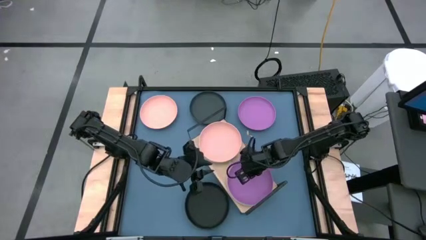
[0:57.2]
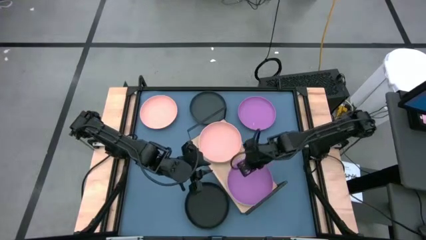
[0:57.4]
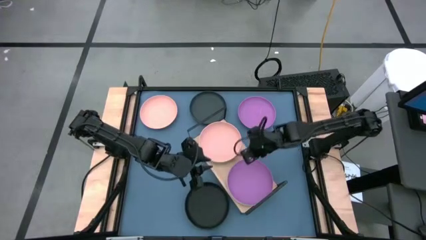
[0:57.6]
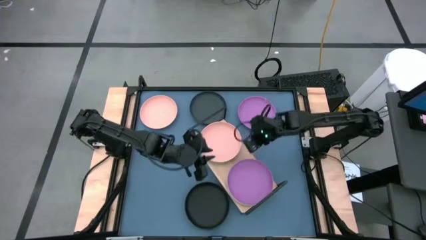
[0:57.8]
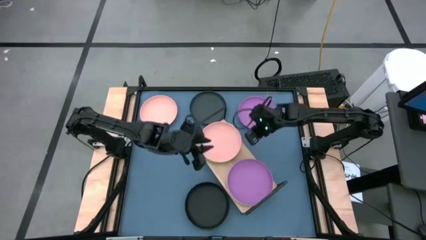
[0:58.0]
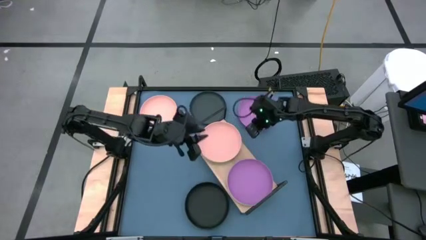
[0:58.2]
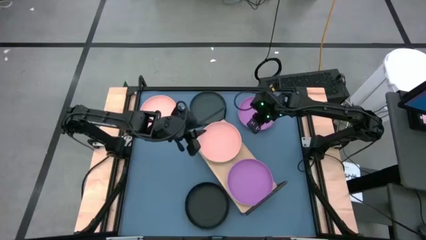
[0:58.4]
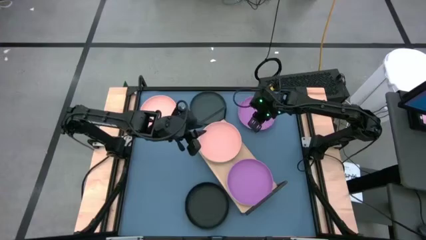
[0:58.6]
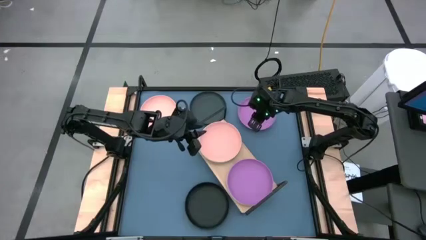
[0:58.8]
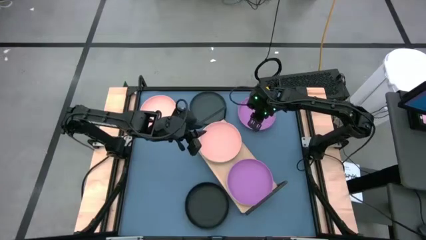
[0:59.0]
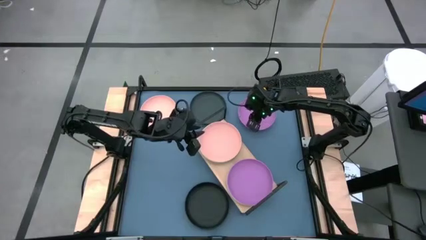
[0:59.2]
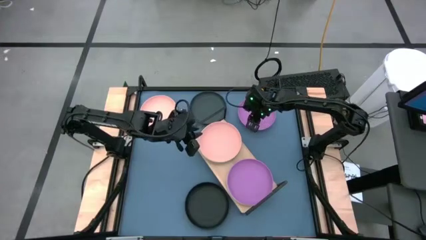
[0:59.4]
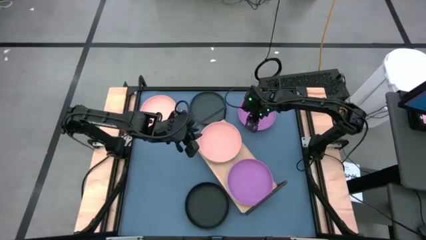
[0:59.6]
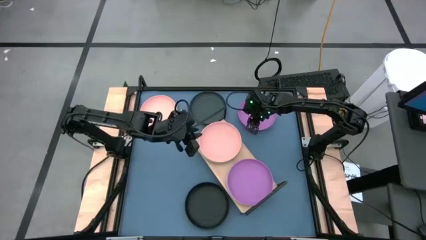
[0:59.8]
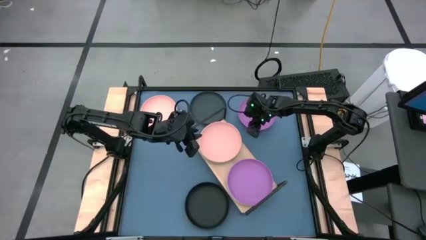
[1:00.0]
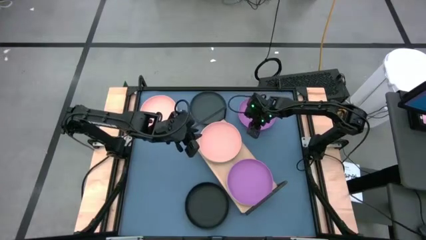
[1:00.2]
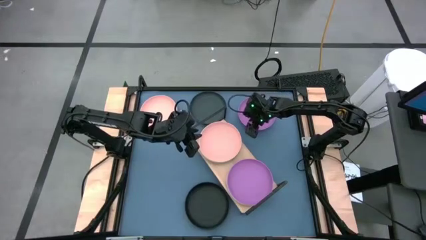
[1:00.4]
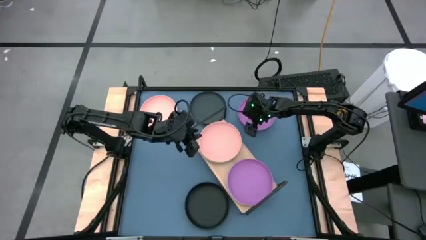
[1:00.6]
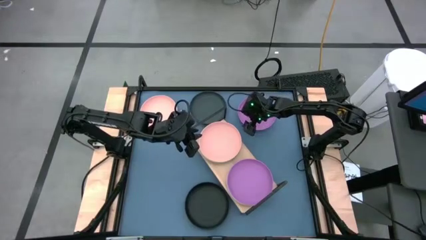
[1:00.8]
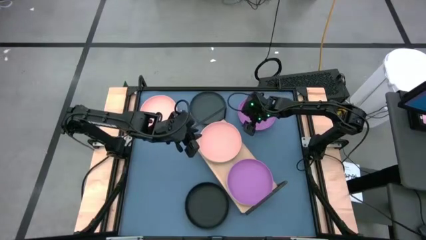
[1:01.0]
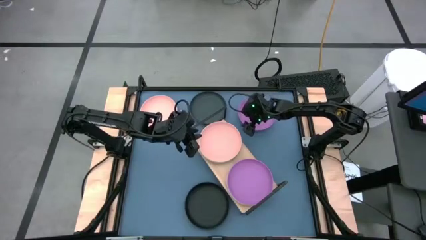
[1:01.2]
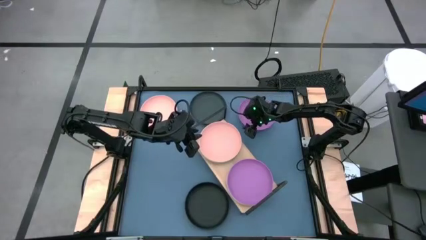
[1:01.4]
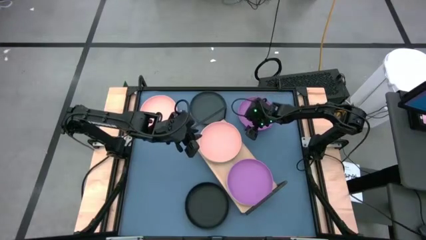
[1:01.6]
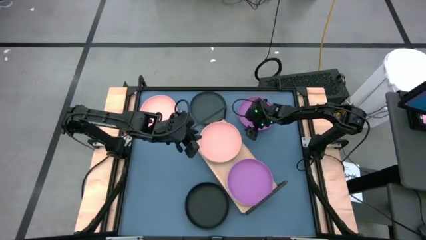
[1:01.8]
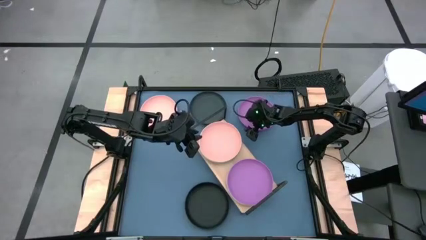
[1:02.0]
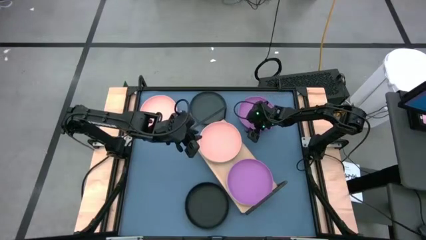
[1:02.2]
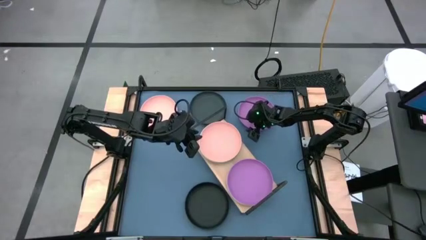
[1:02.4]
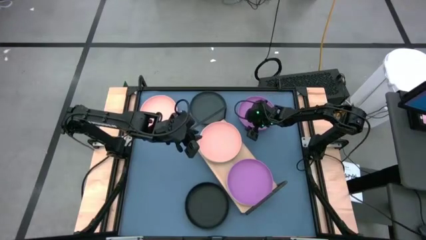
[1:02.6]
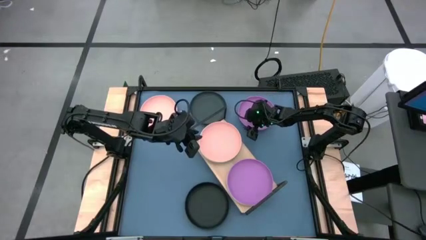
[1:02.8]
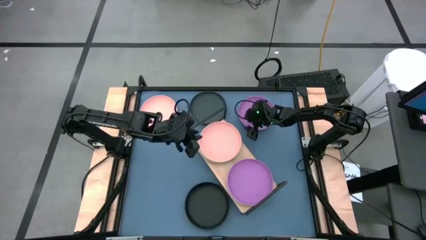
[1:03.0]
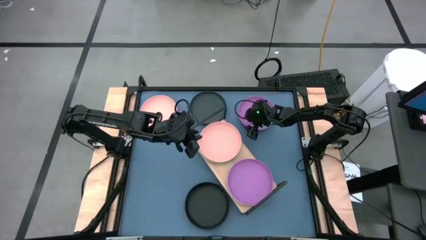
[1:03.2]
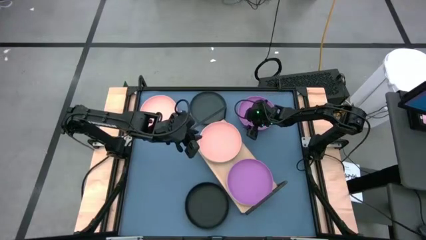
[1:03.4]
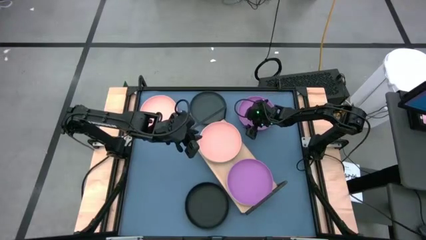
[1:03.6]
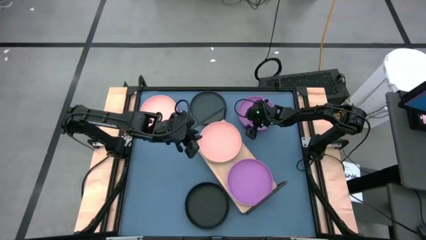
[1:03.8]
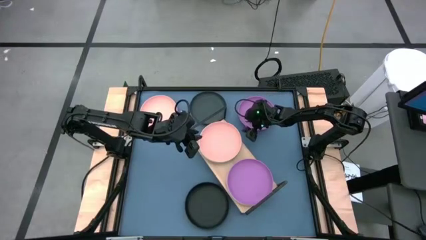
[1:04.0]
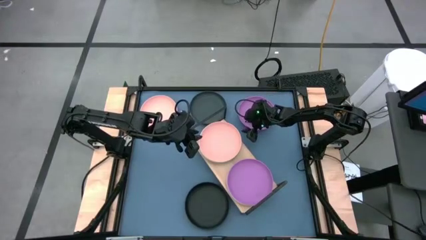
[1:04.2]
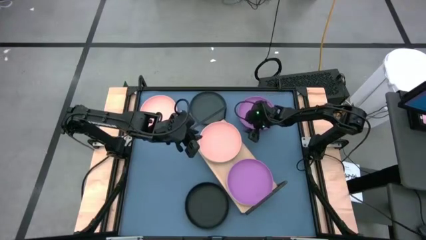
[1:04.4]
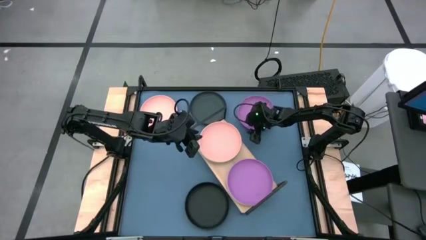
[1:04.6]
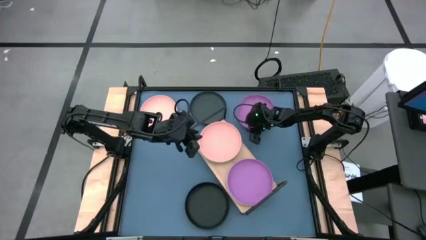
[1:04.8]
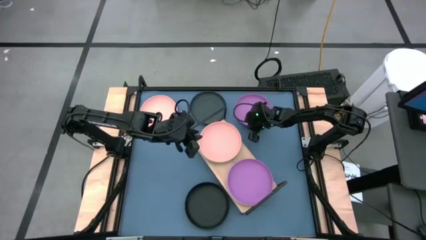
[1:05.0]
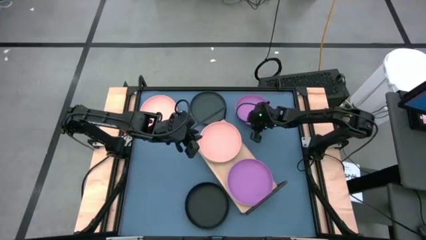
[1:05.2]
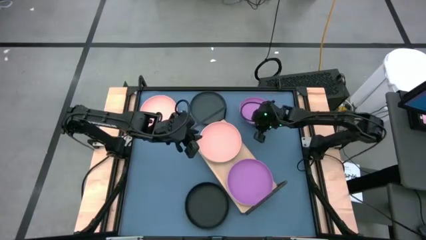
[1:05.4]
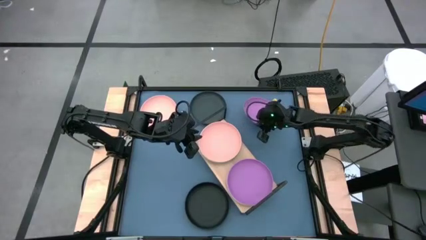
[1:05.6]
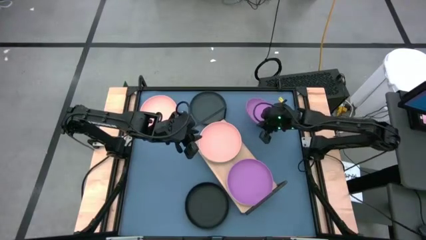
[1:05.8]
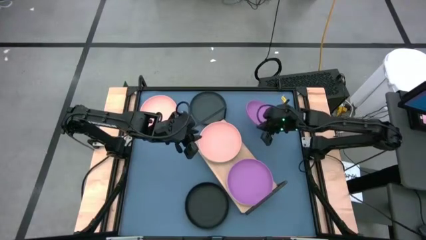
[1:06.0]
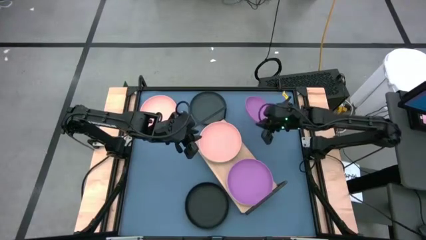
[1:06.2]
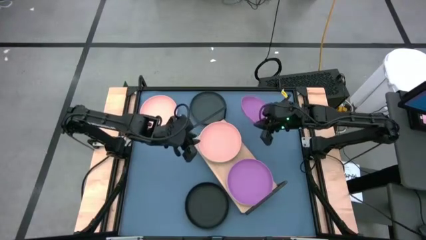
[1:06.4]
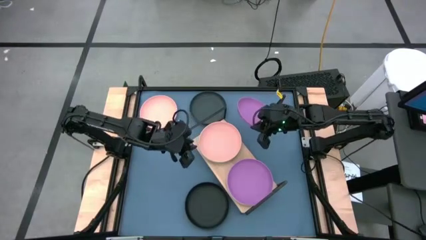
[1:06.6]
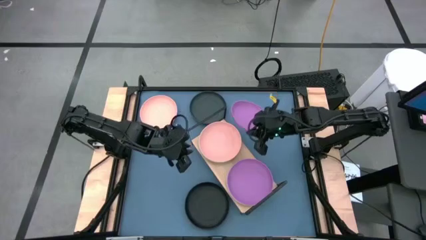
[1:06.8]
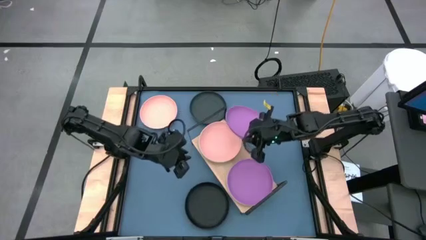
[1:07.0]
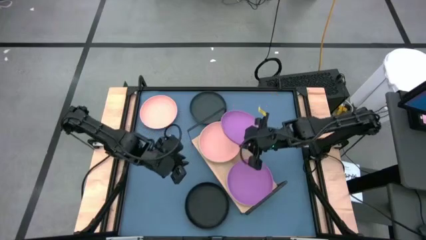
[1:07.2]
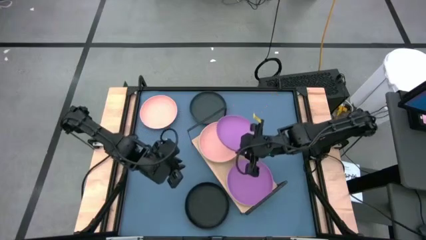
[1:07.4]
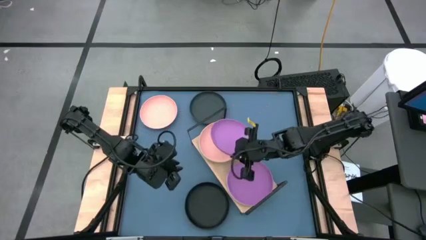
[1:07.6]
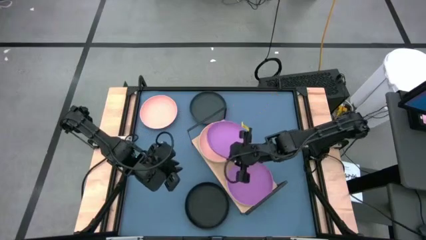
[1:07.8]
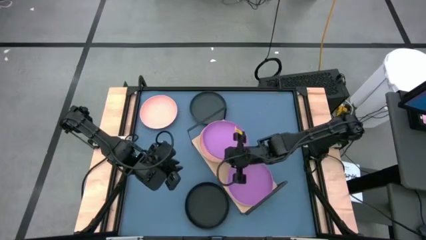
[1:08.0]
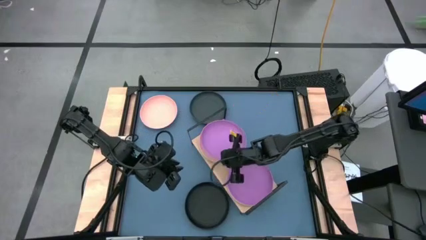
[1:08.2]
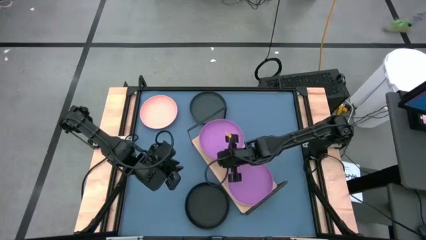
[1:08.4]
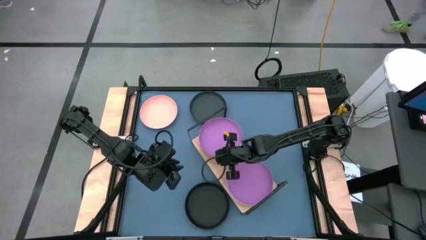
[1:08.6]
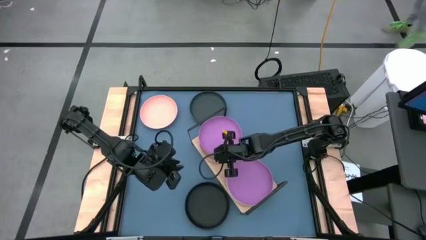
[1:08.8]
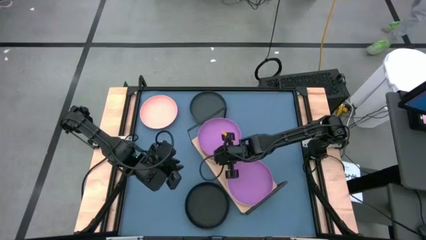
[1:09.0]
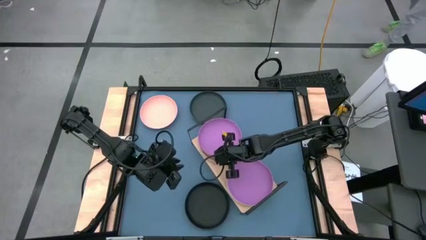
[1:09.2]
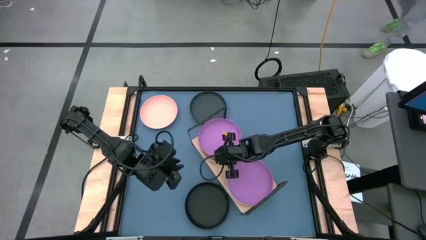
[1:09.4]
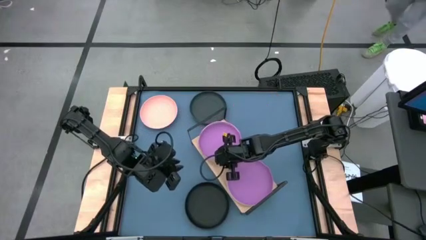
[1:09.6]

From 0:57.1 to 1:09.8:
Task: Place and stack plates onto a shelf
Stack the purple plate on top of the light orange plate on the shelf

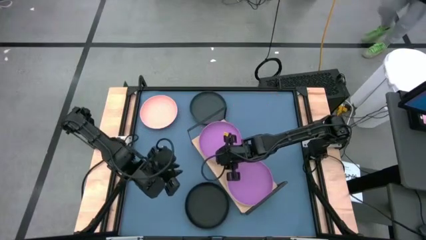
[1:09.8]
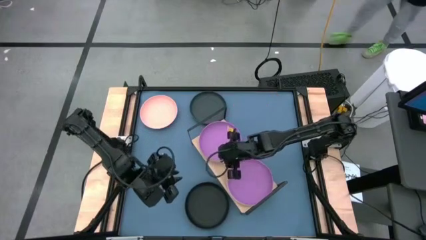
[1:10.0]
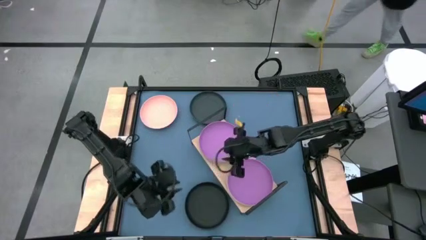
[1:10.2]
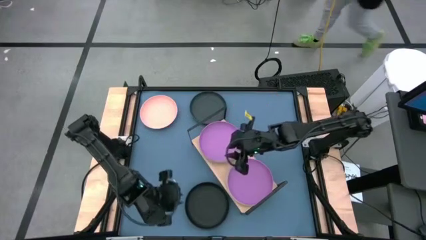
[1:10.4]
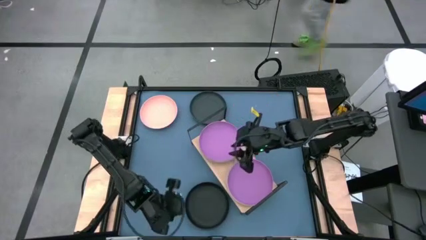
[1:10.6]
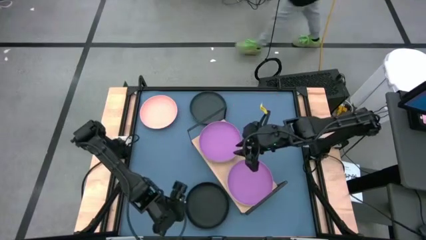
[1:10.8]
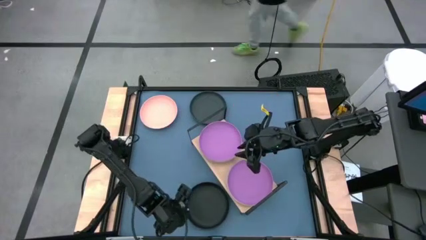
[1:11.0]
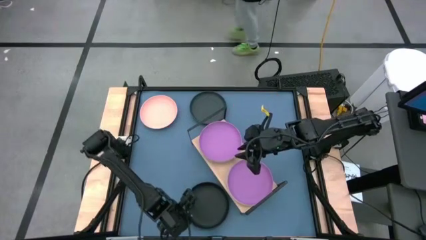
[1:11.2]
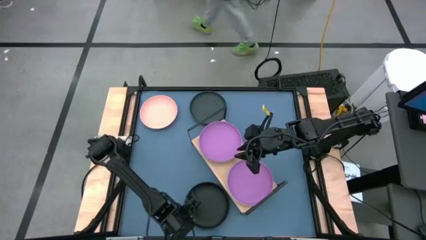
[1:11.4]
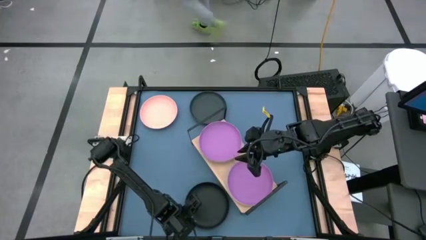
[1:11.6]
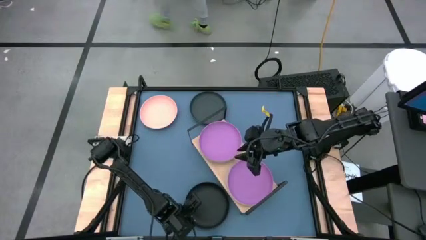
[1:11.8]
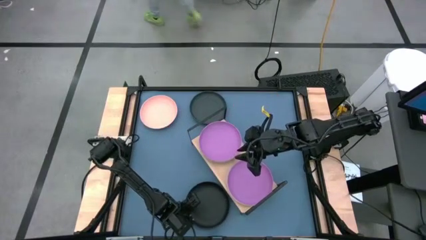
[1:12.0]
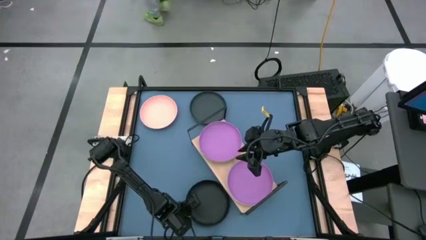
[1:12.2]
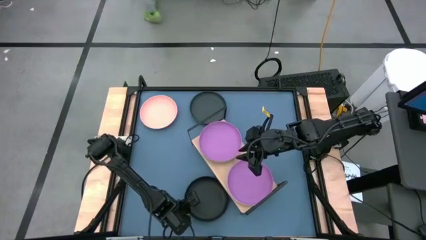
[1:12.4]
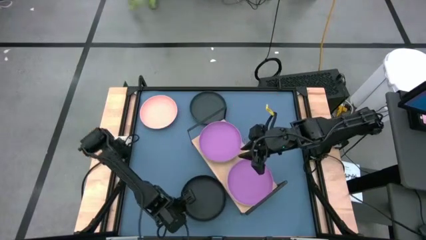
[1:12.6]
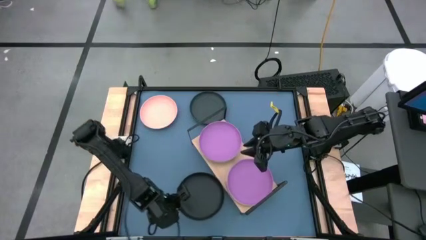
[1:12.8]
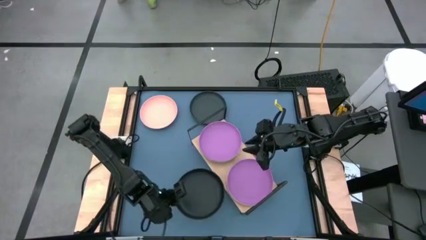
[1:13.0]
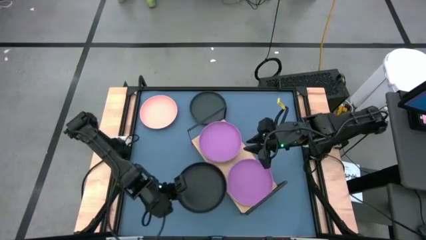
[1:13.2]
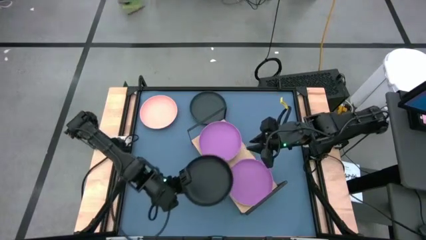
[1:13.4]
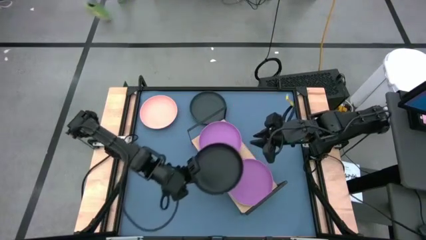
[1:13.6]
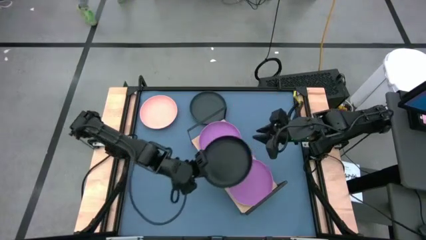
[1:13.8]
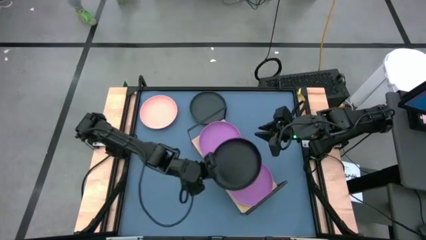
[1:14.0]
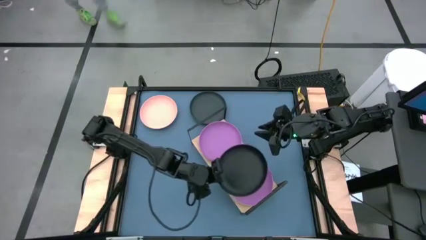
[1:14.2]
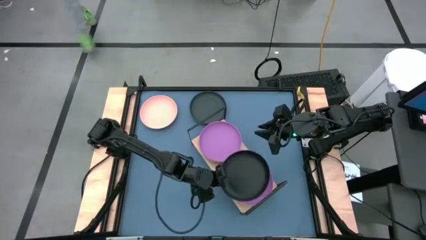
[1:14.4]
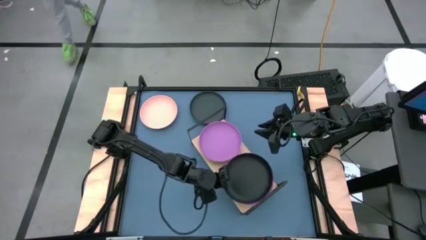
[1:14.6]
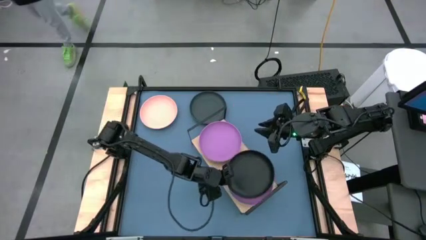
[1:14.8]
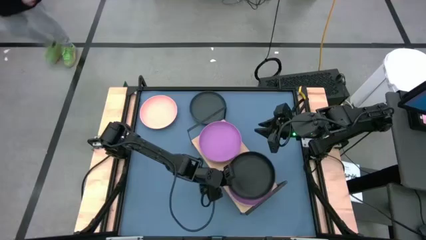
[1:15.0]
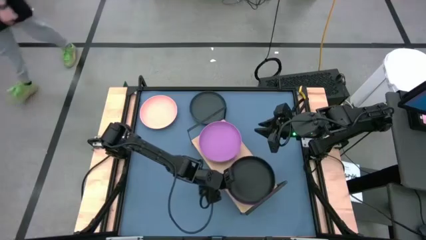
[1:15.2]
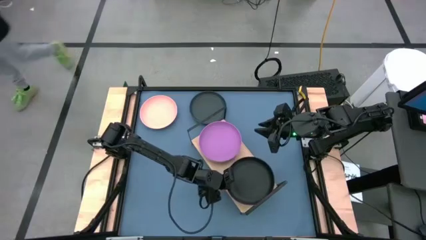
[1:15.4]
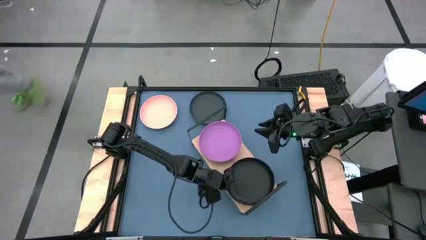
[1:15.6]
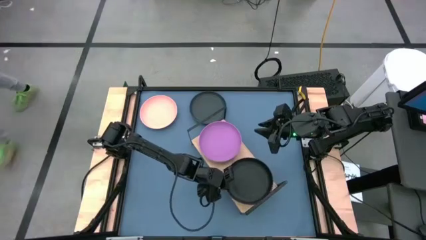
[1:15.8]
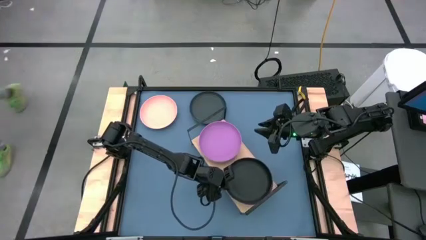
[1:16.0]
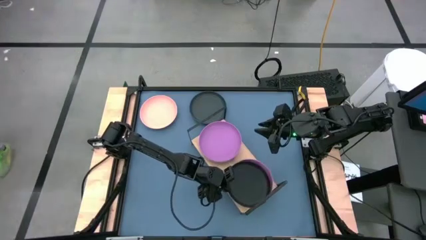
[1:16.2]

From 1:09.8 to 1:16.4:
Stack the bottom black plate on top of the bottom purple plate on the shelf
